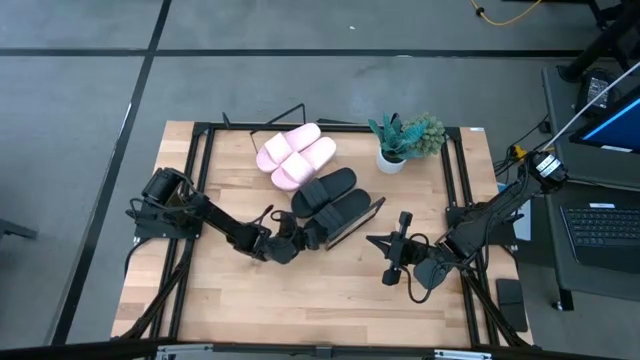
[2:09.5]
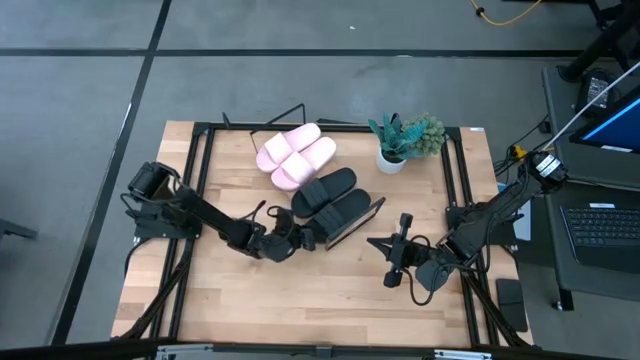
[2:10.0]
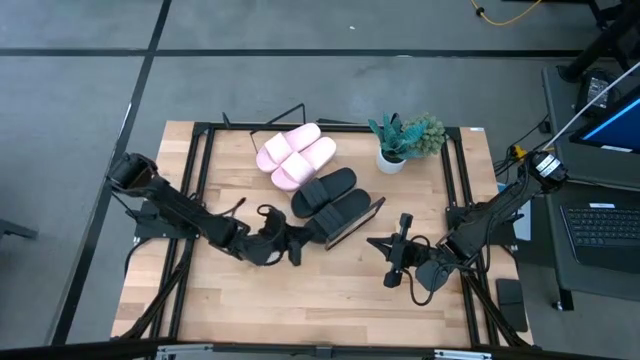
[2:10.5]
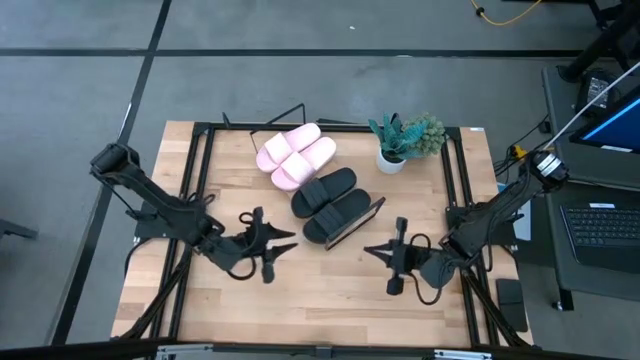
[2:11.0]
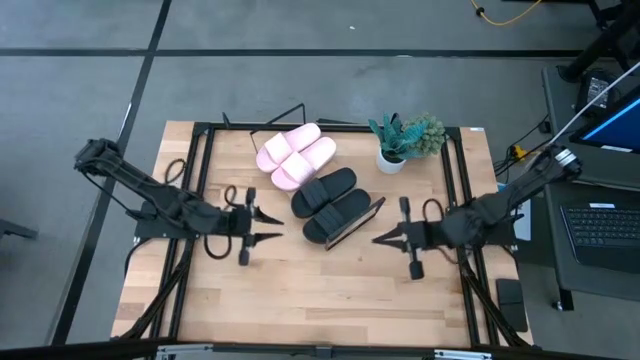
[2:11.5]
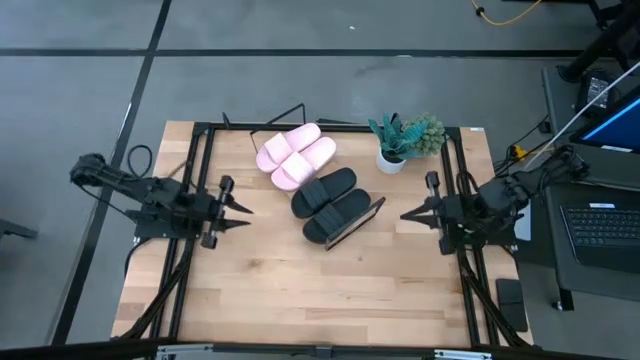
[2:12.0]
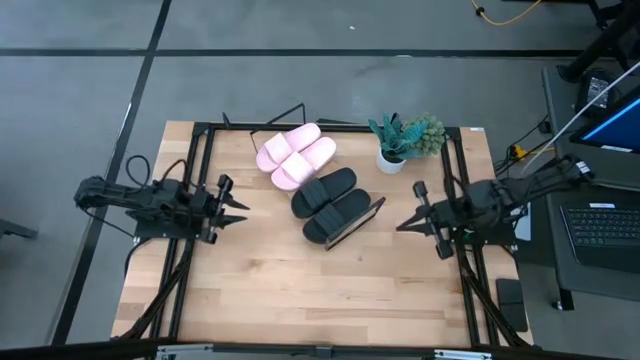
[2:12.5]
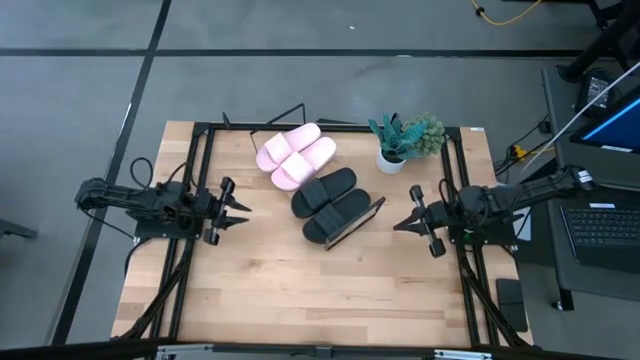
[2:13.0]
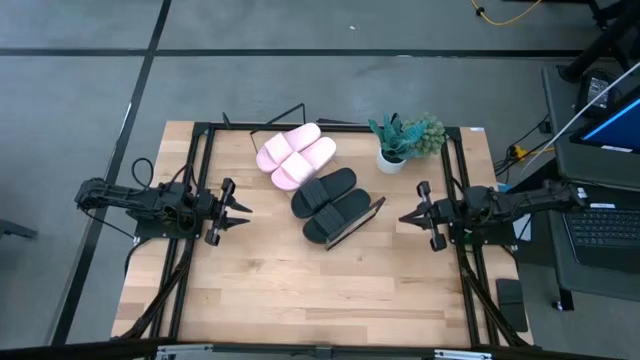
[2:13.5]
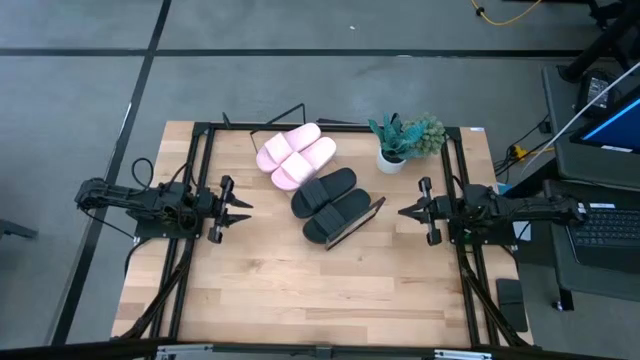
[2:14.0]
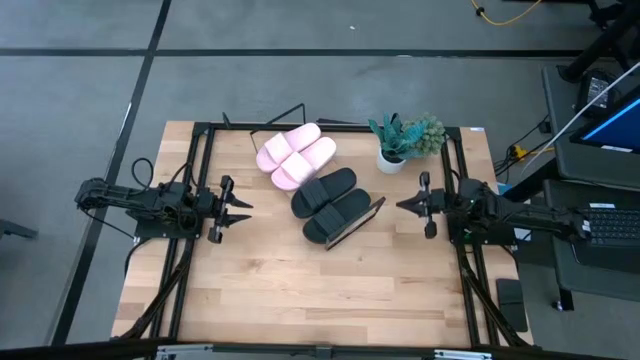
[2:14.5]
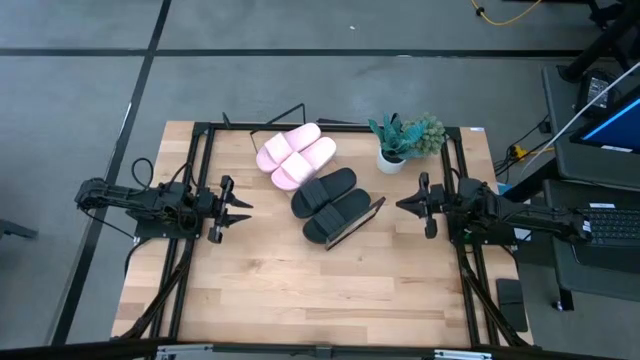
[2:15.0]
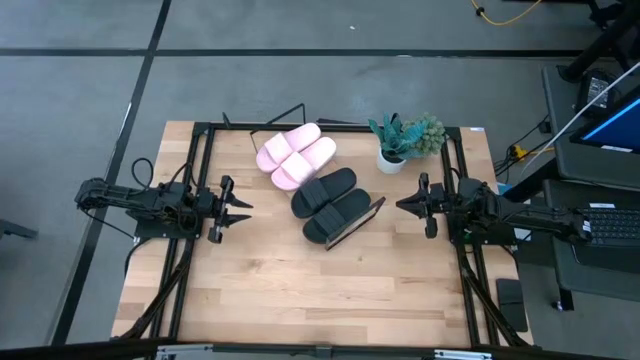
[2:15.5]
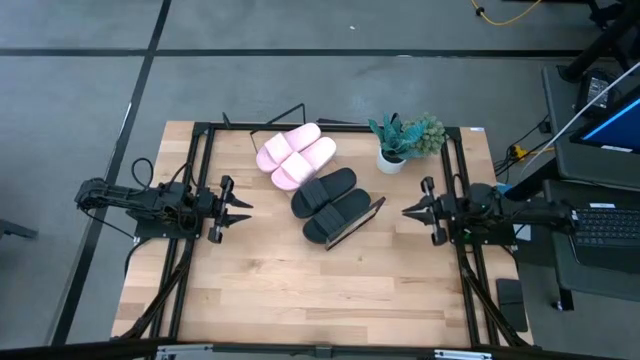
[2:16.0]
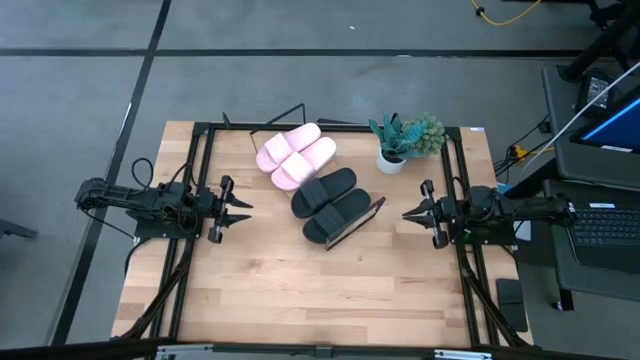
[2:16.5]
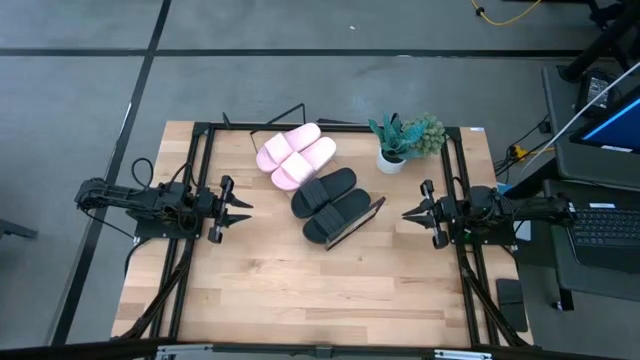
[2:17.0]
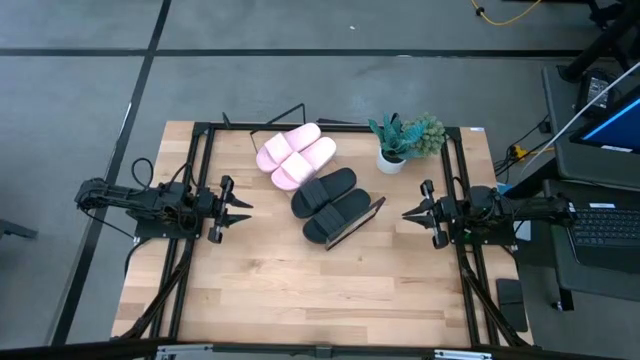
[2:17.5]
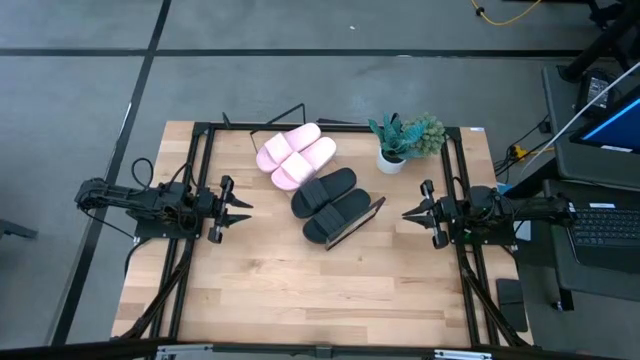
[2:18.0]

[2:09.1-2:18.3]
Task: Pick and place slides into the shelf
Return to Home Position

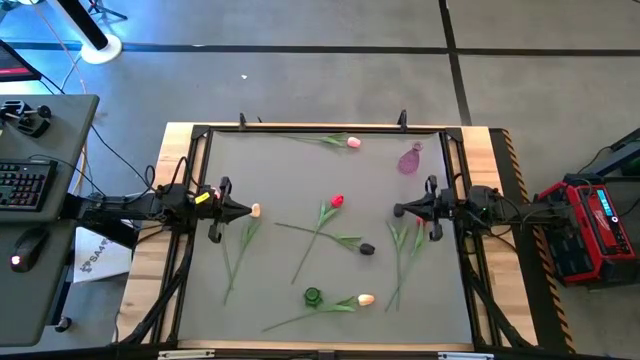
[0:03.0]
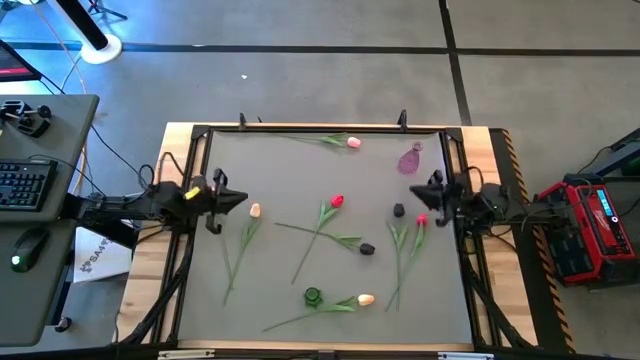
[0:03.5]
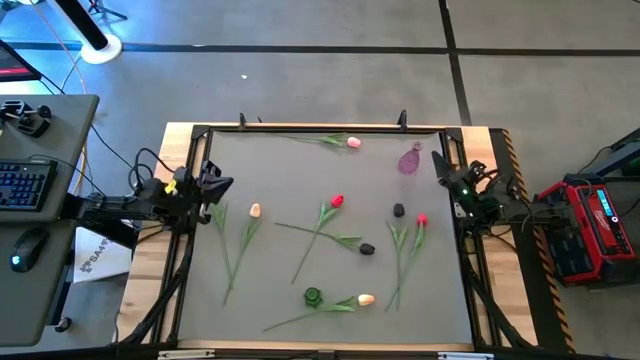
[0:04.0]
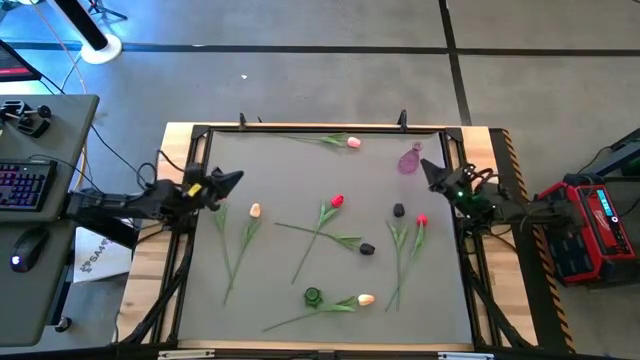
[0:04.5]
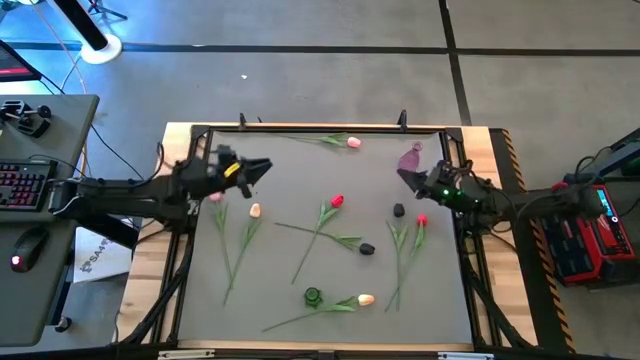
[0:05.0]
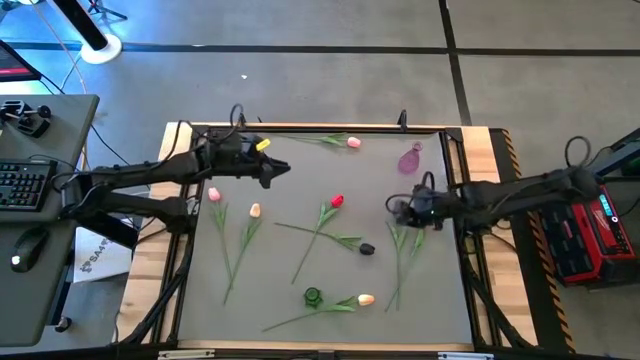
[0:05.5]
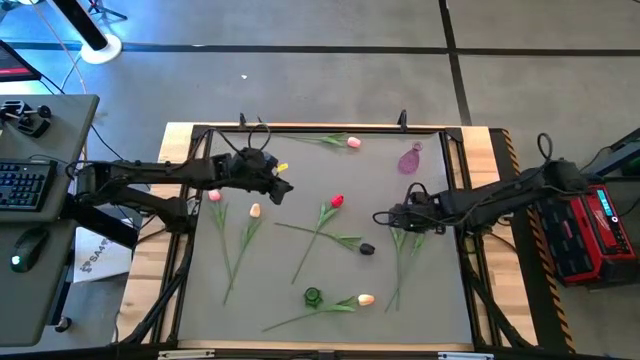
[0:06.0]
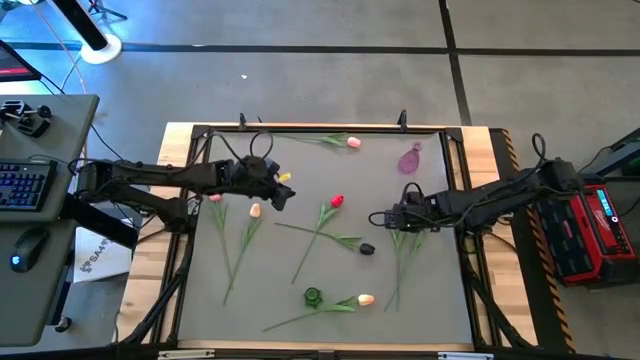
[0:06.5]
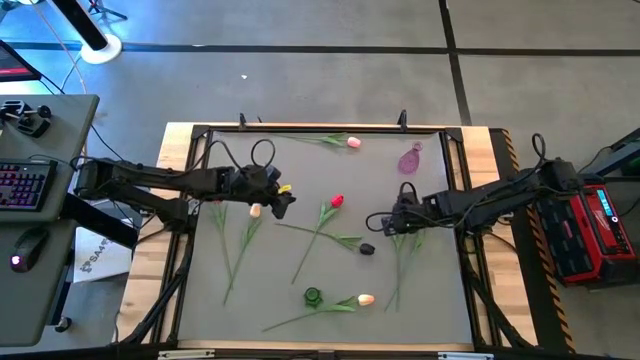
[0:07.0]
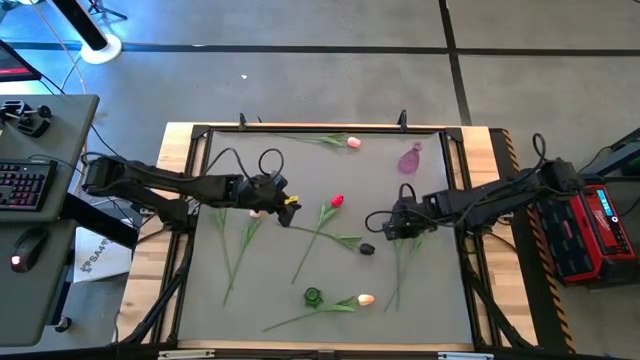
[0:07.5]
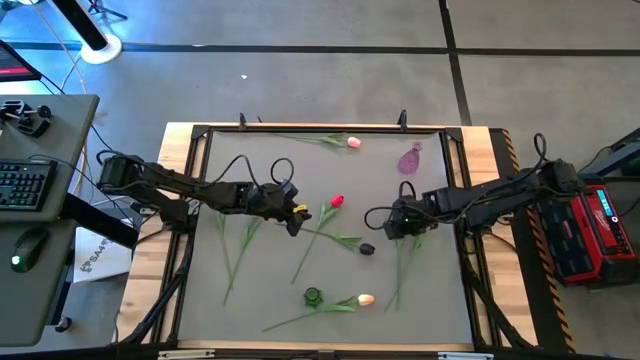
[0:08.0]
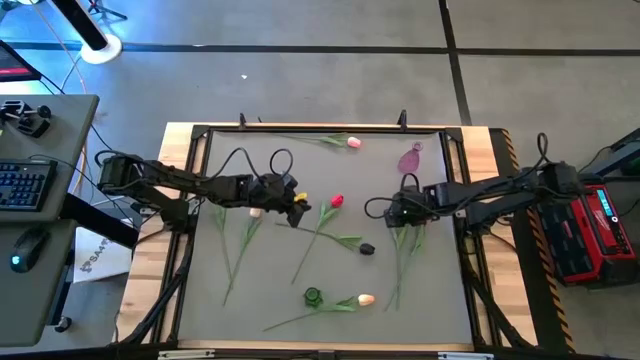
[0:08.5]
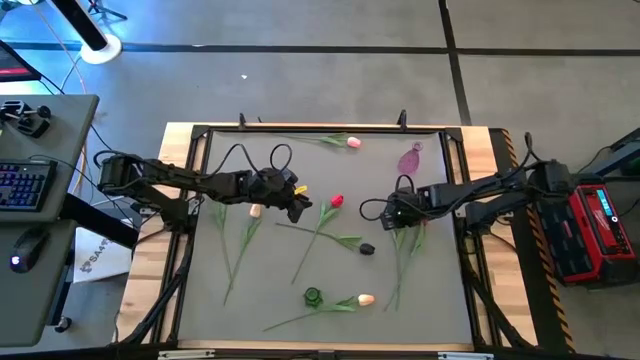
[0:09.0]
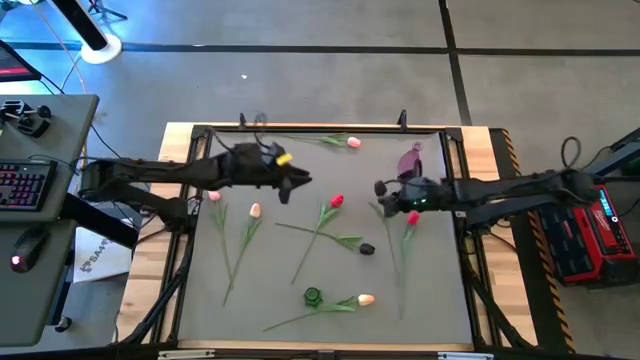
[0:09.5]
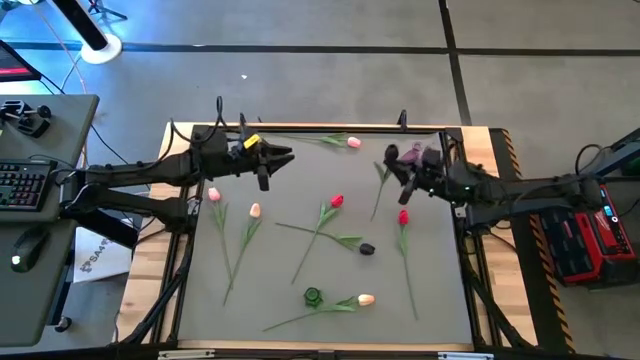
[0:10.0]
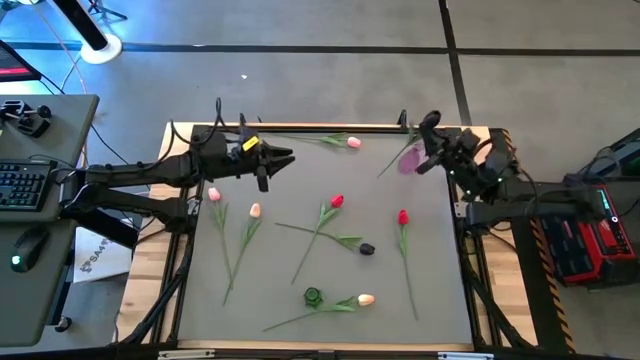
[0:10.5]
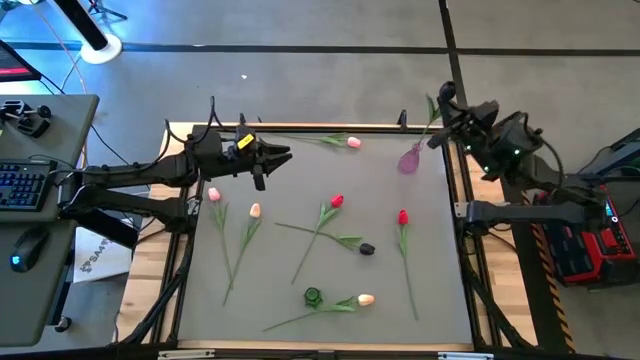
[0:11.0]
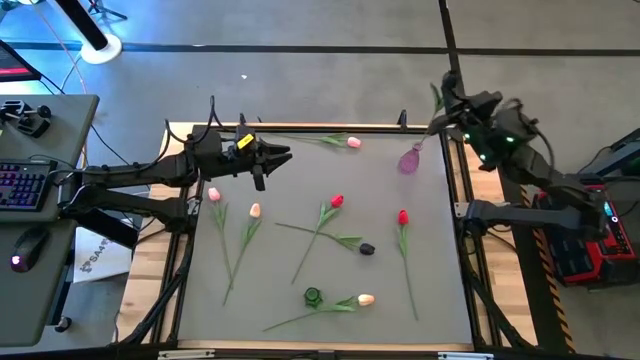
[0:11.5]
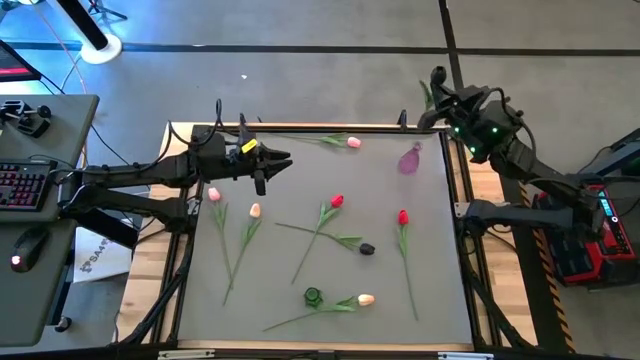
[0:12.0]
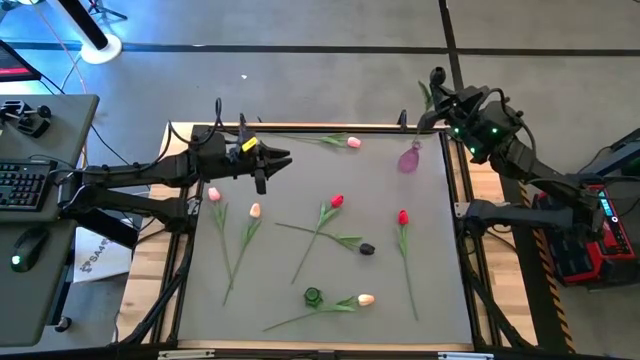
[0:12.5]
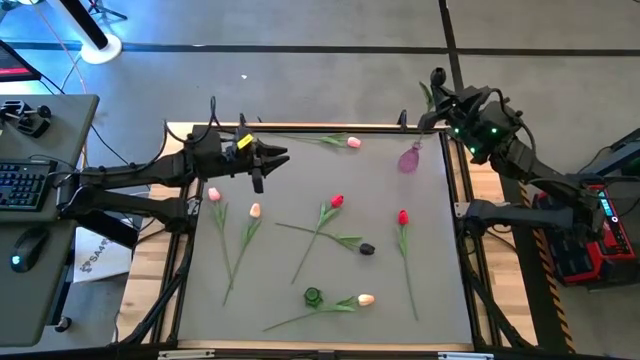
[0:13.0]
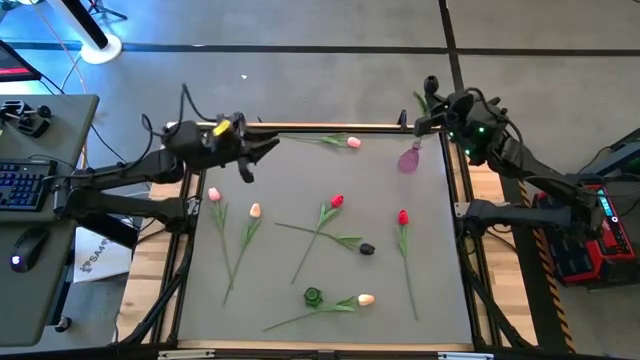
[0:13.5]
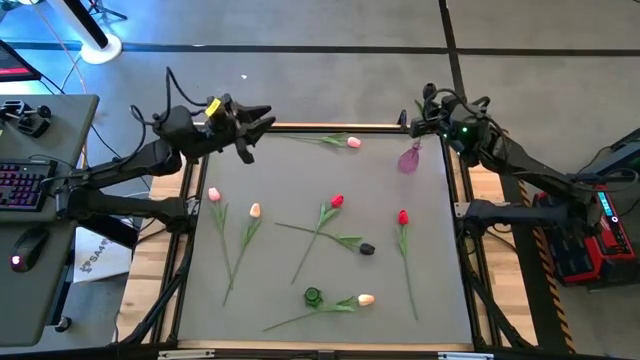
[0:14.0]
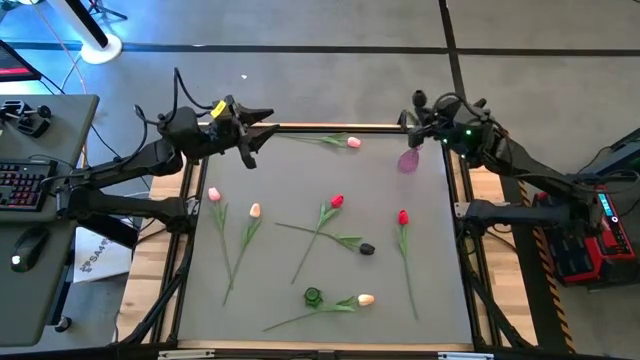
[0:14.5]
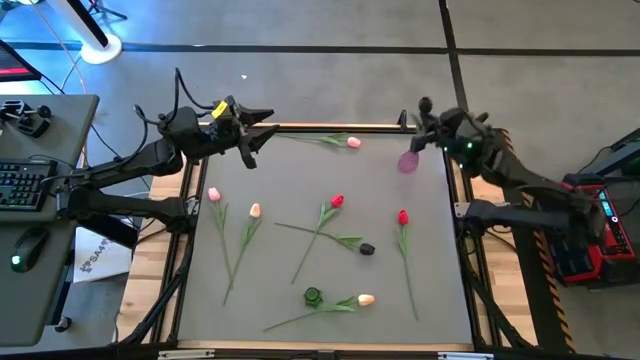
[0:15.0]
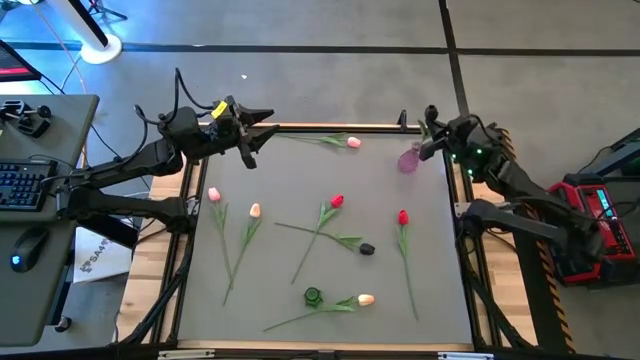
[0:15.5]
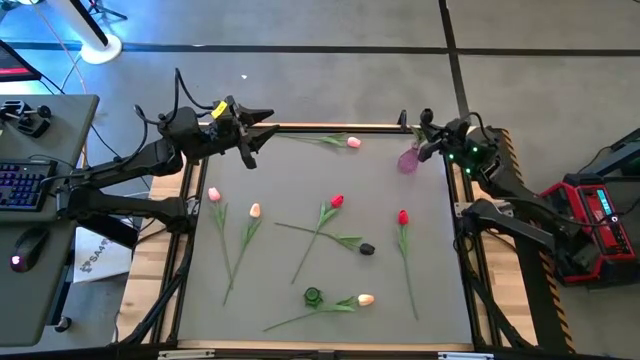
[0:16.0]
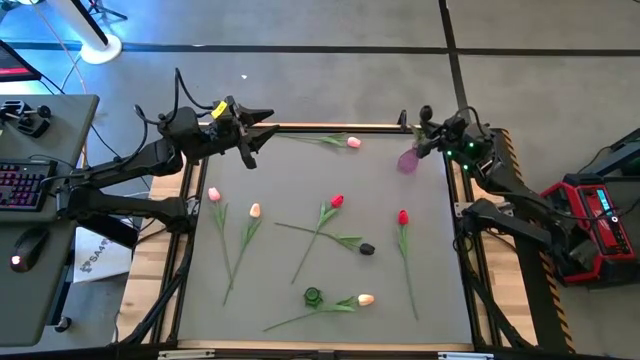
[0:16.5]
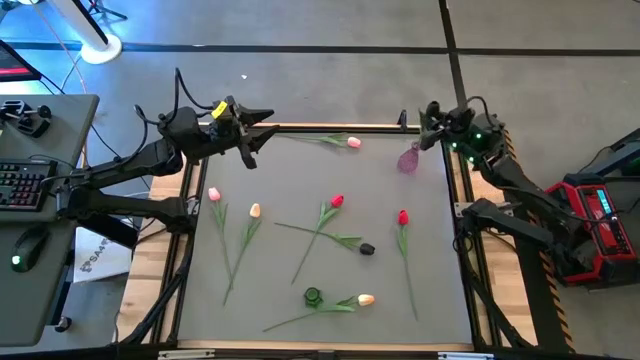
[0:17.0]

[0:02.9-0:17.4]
Task: Sort flowers into vase by color
Put the right black flower into the violet vase
